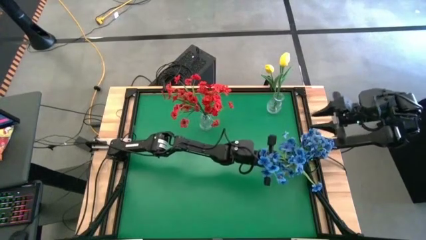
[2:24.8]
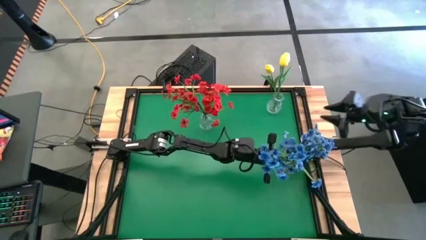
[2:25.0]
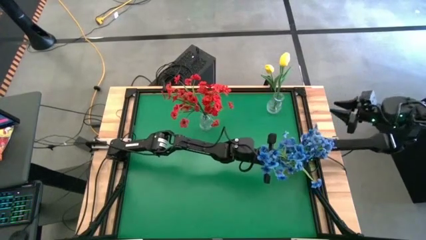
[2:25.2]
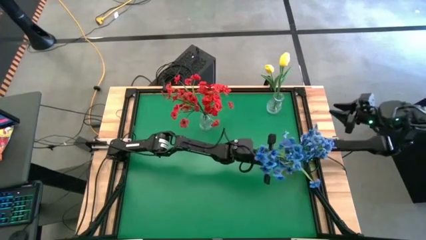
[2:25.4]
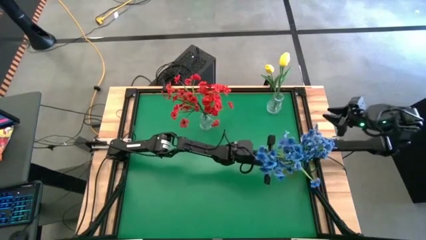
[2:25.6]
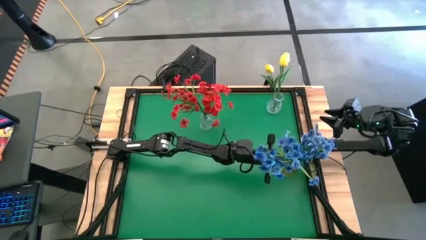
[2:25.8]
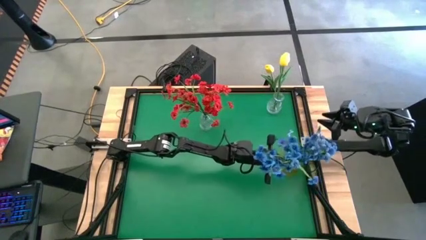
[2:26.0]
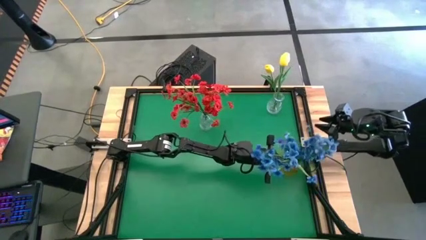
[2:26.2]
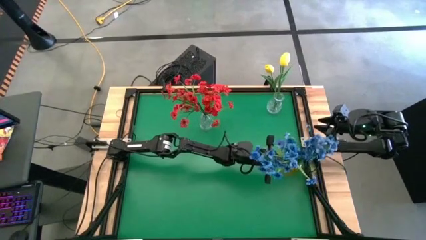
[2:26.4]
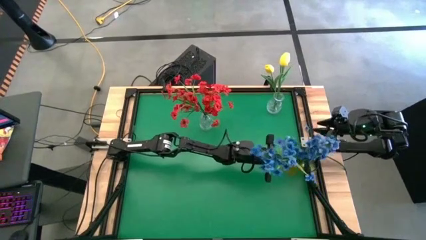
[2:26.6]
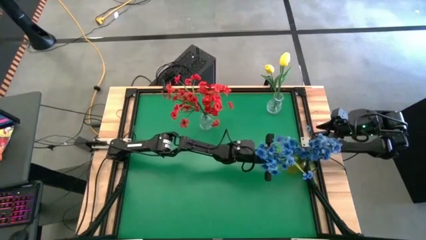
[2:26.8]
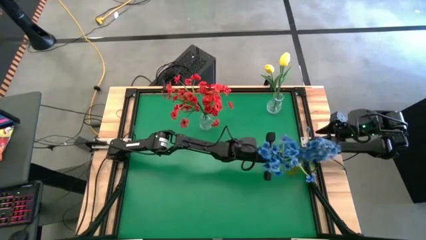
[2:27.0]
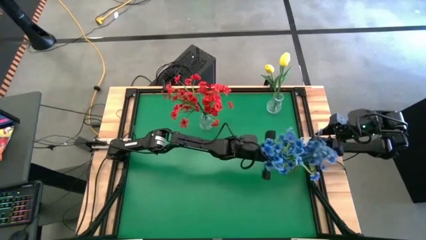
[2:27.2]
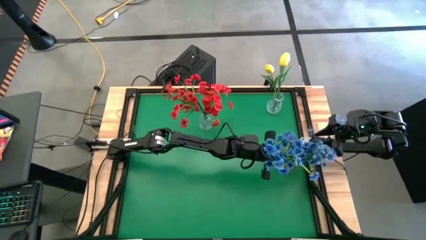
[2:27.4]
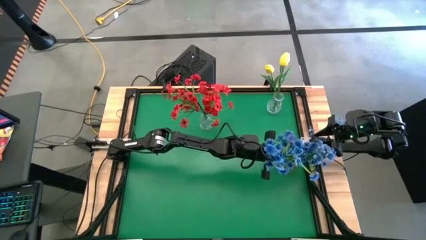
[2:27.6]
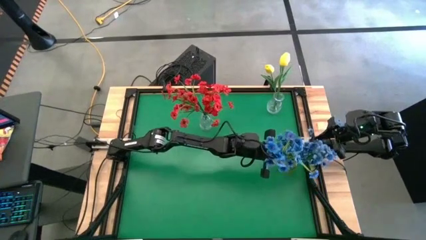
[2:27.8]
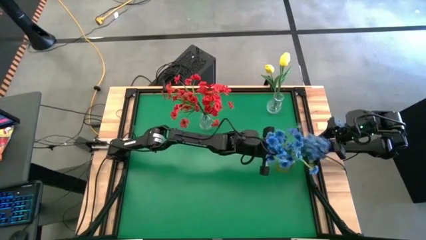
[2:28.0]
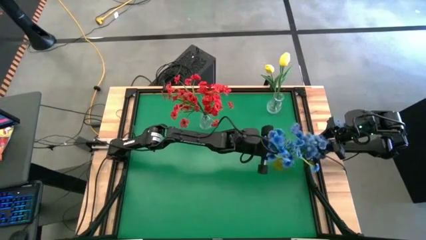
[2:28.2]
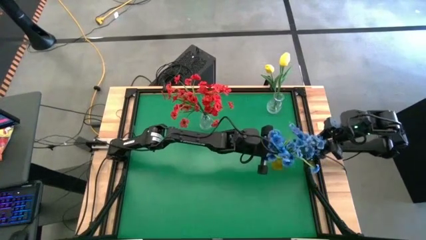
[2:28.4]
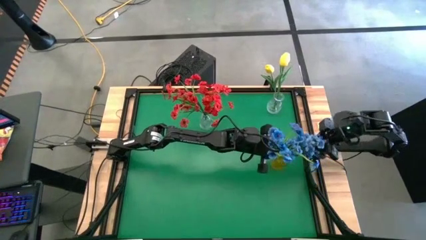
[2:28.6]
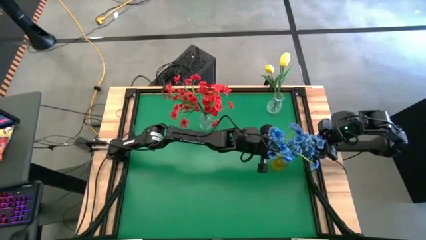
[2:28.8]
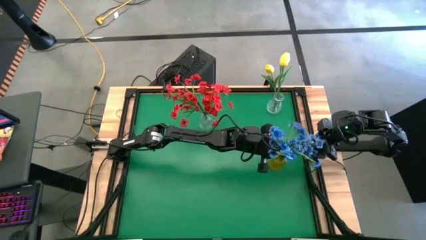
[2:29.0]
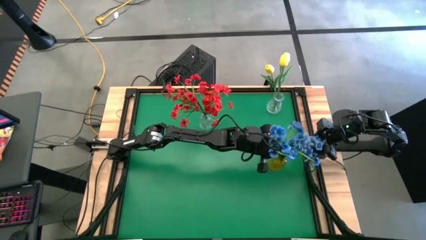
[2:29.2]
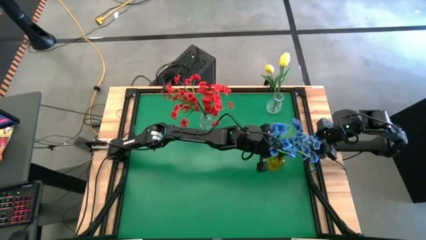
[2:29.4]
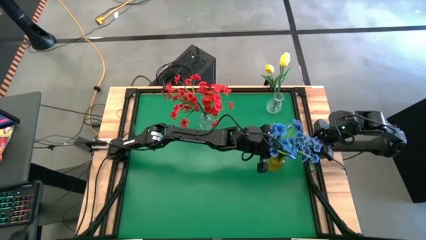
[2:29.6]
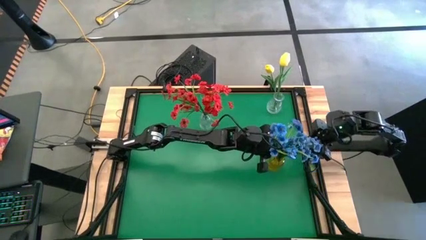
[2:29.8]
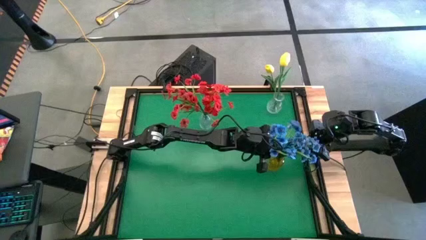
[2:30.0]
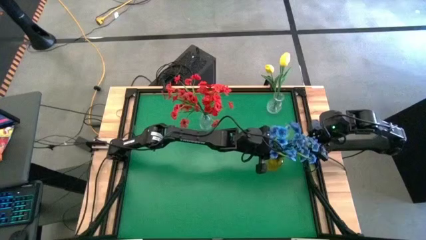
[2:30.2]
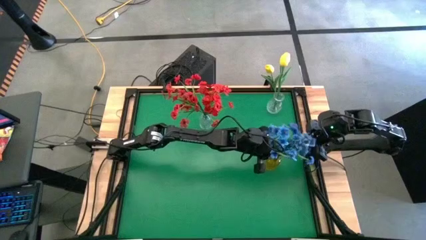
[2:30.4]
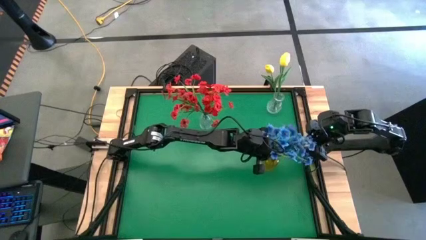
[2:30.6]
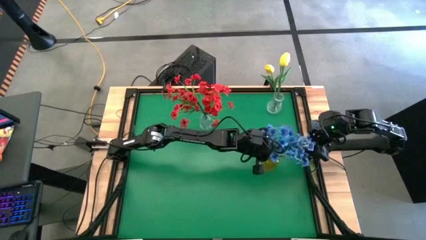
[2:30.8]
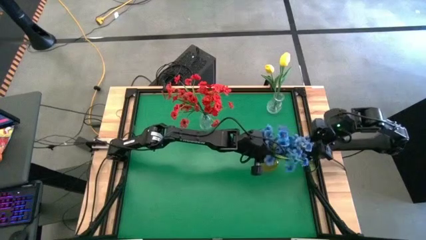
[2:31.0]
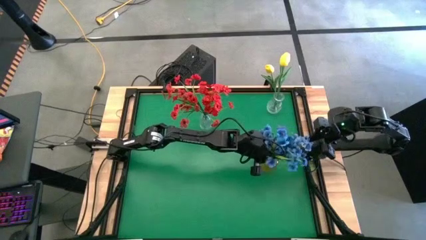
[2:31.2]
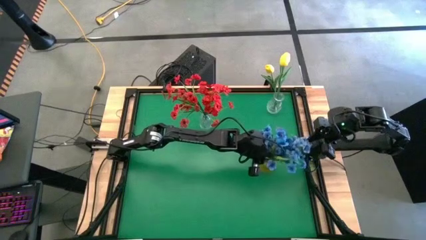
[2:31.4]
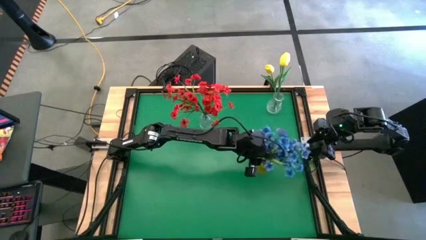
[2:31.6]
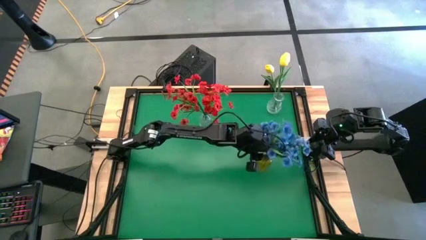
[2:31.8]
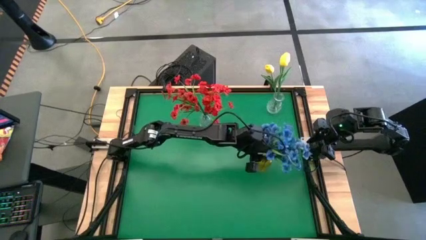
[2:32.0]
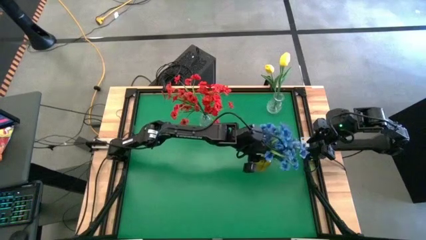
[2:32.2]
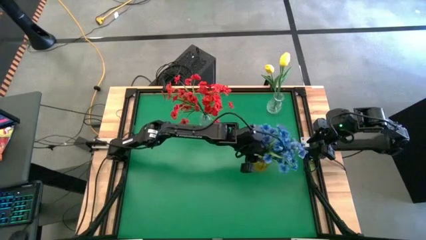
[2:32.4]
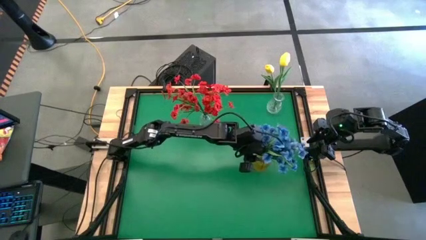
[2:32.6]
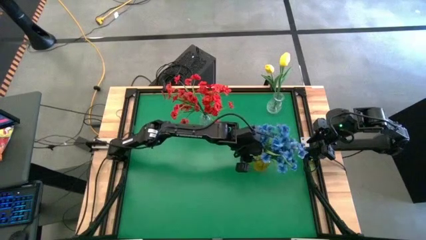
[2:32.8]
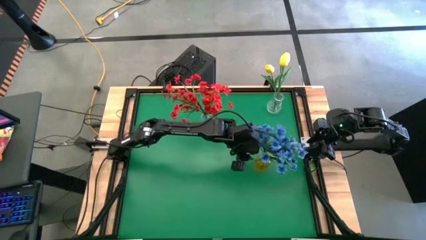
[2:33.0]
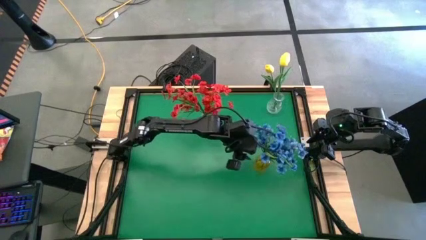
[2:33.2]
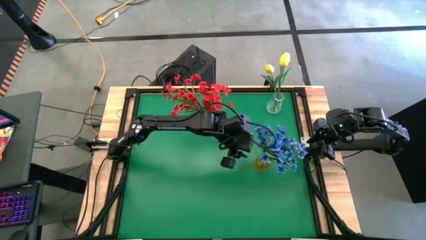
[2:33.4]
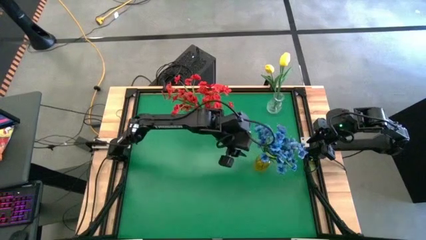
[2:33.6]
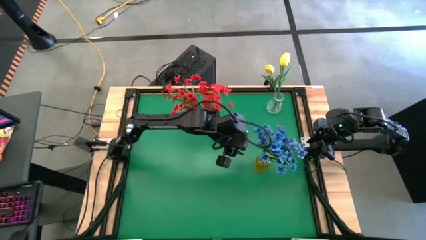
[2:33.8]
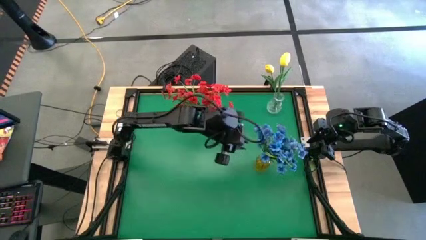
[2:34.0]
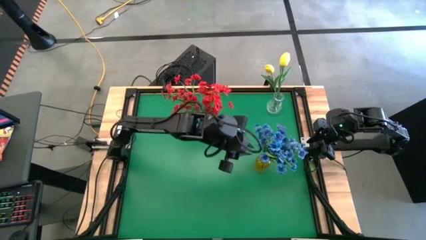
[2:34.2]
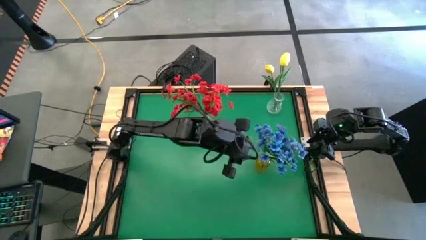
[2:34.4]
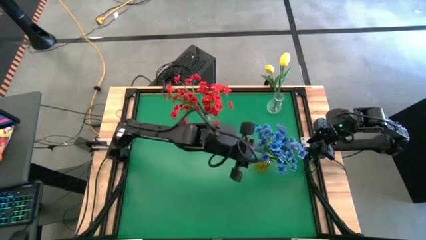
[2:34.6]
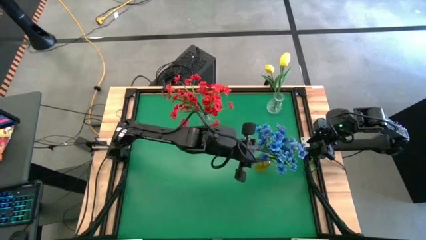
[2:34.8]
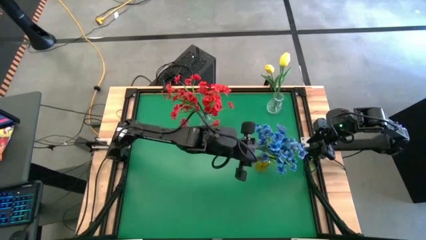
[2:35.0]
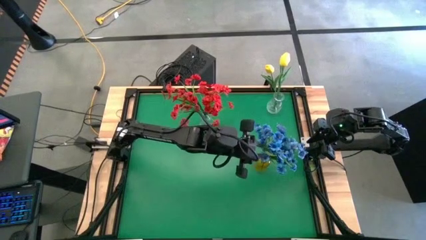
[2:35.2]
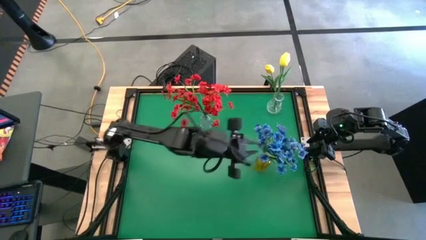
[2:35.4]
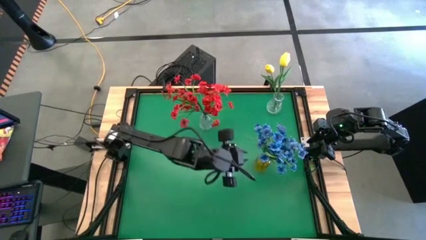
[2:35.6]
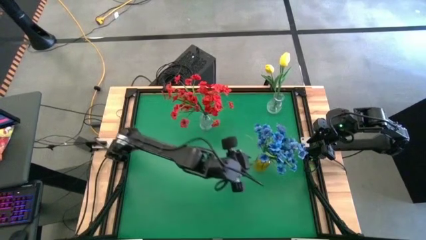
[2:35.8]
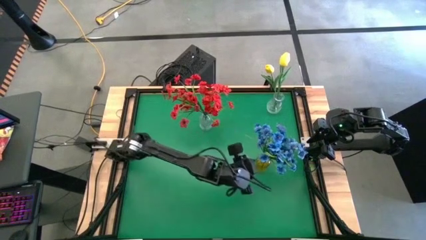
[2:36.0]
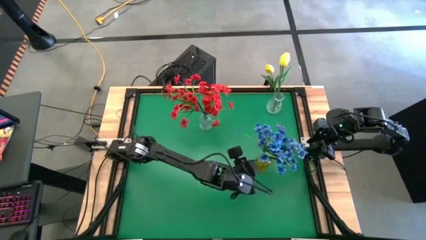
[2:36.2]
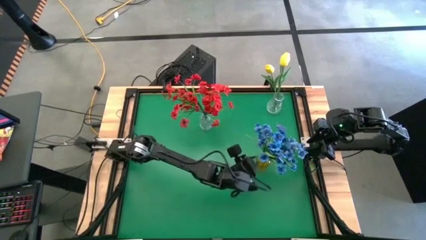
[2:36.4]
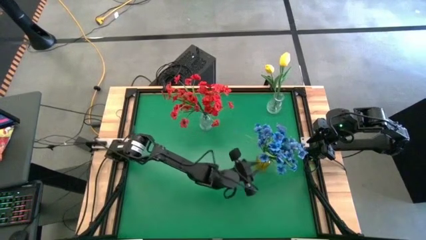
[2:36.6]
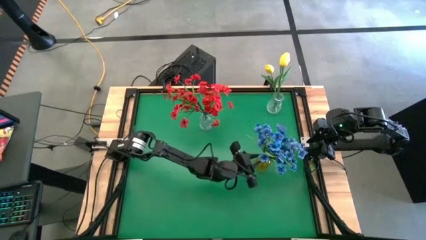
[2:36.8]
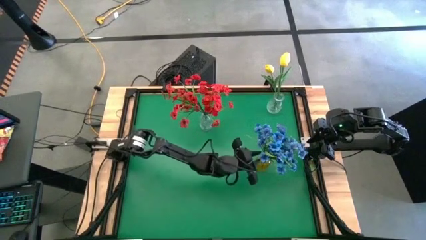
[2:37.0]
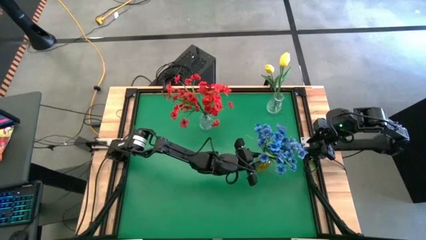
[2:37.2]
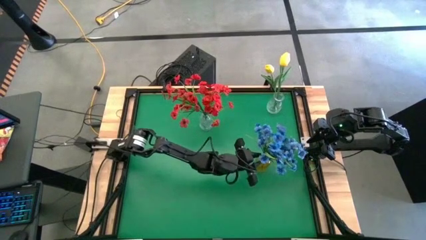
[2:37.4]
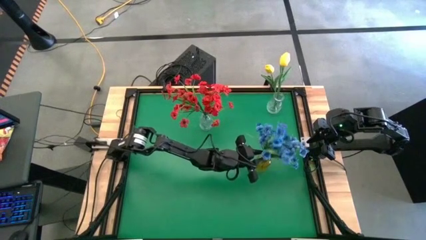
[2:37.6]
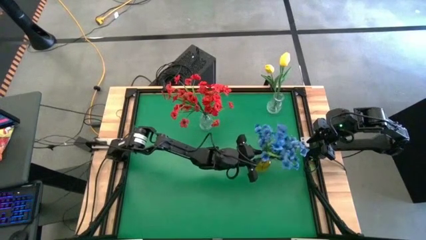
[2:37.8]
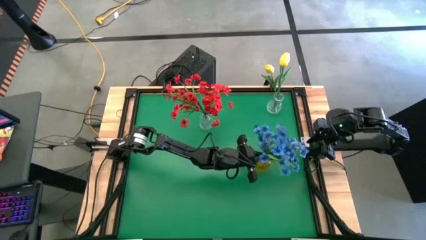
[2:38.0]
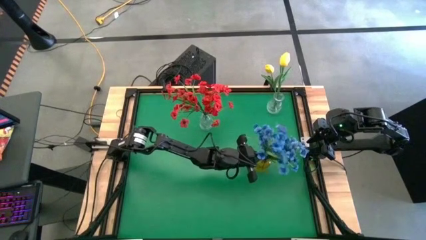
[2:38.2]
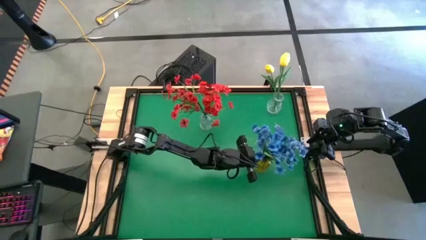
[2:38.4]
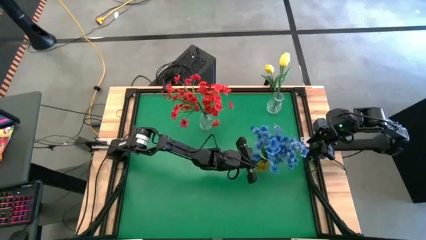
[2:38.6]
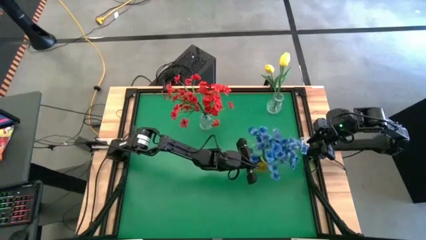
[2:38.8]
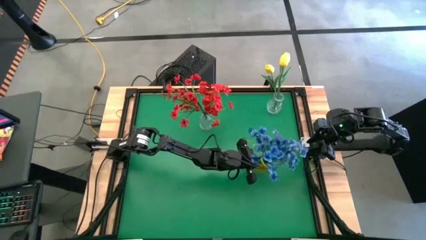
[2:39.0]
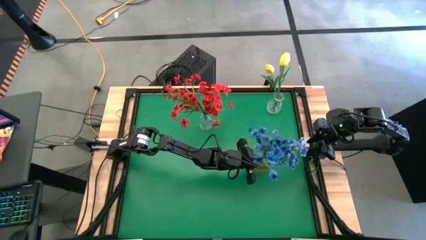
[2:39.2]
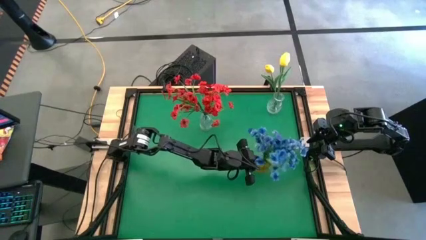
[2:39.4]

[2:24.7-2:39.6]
Task: Sort flowers into vase by color
Put the blue flowers into the yellow transparent vase
